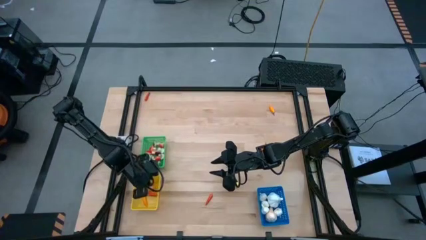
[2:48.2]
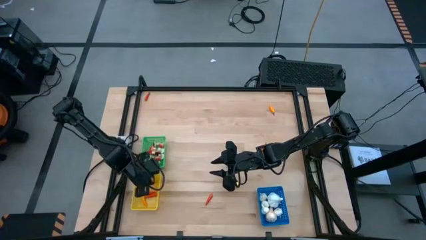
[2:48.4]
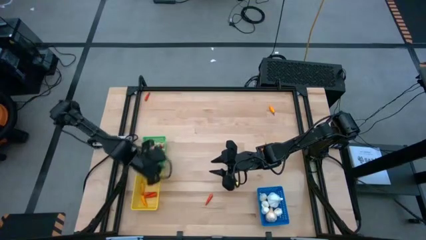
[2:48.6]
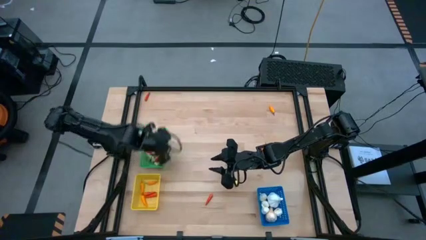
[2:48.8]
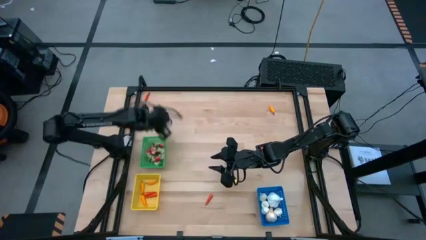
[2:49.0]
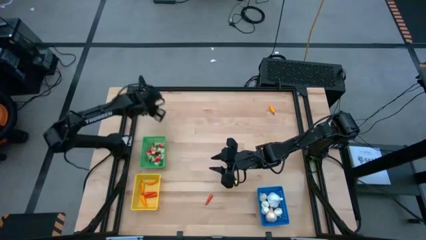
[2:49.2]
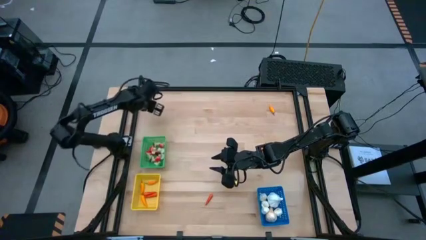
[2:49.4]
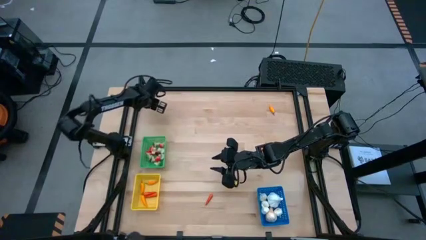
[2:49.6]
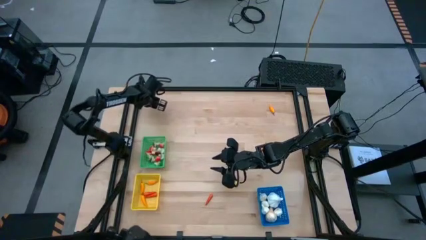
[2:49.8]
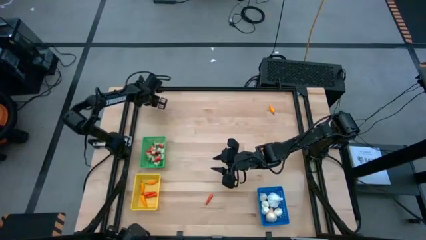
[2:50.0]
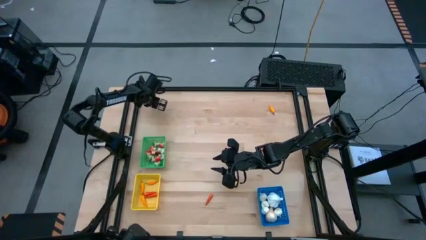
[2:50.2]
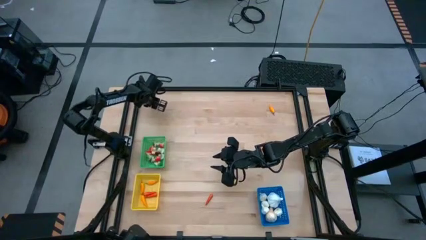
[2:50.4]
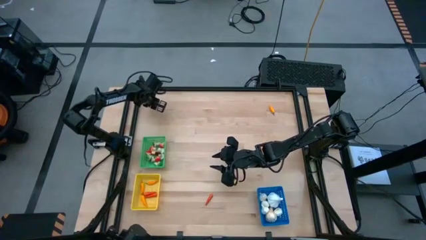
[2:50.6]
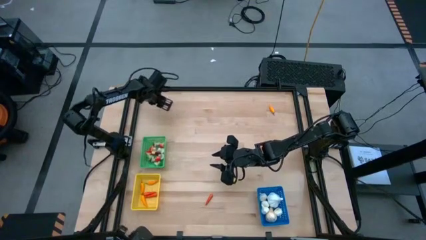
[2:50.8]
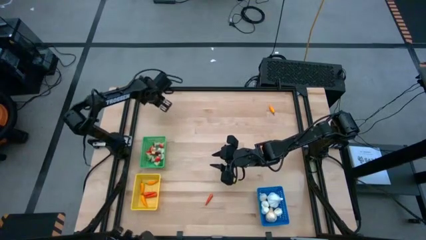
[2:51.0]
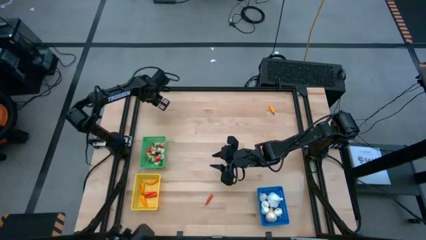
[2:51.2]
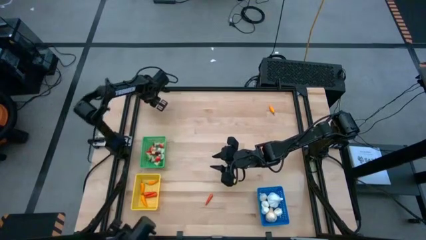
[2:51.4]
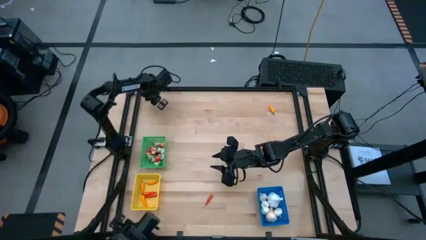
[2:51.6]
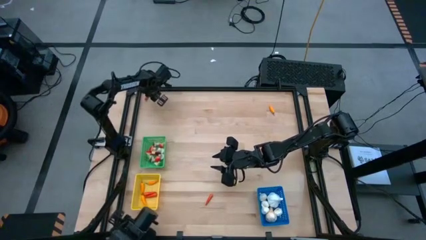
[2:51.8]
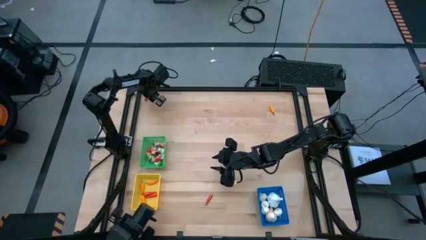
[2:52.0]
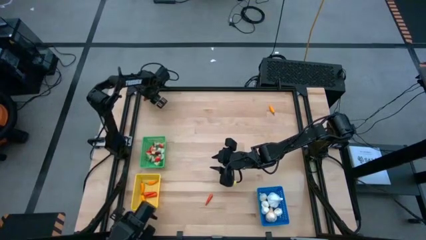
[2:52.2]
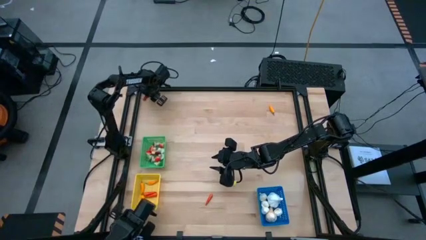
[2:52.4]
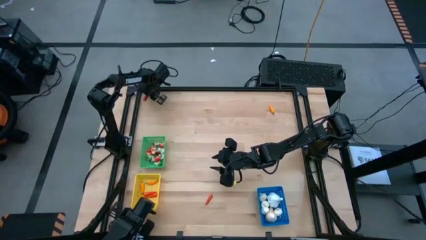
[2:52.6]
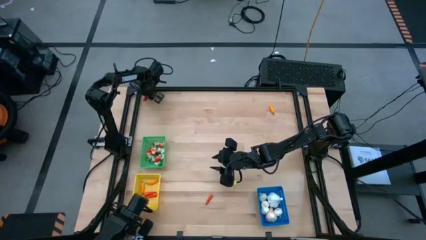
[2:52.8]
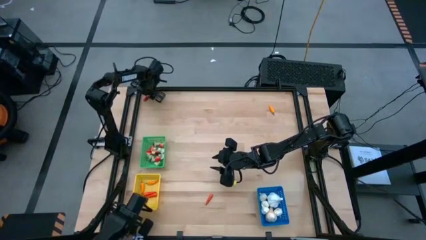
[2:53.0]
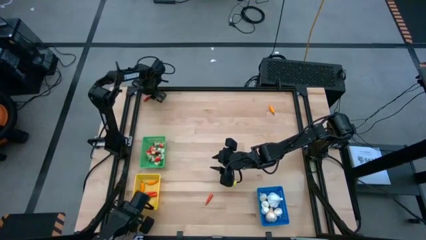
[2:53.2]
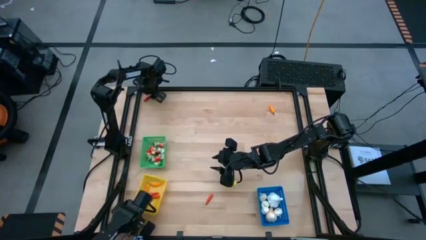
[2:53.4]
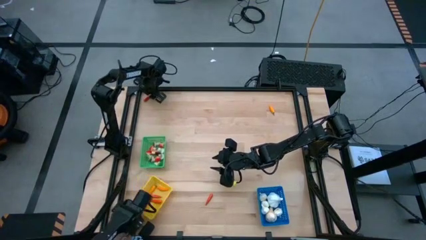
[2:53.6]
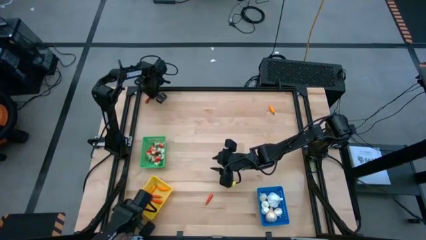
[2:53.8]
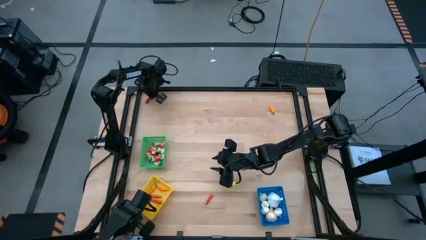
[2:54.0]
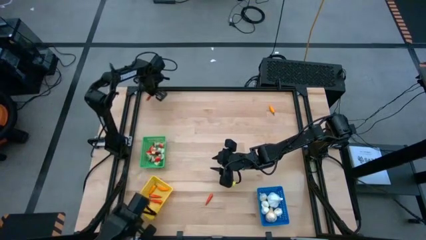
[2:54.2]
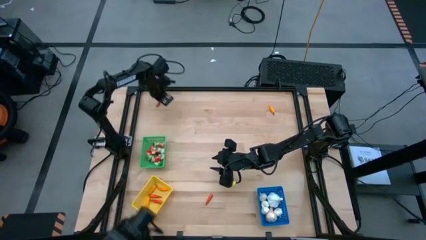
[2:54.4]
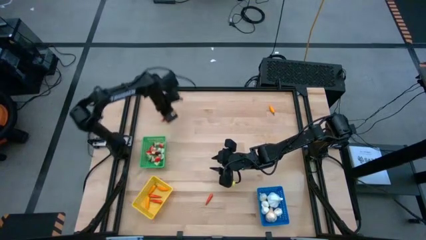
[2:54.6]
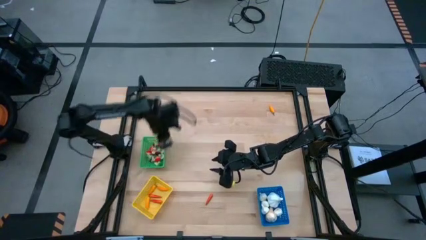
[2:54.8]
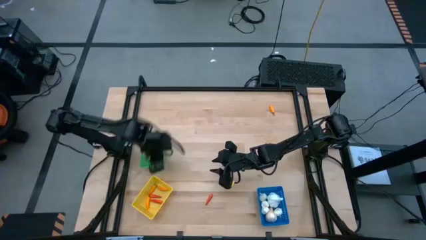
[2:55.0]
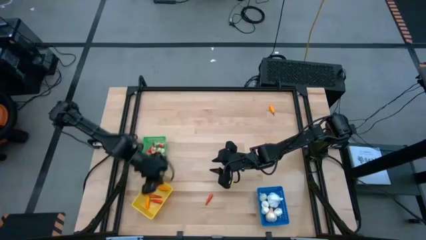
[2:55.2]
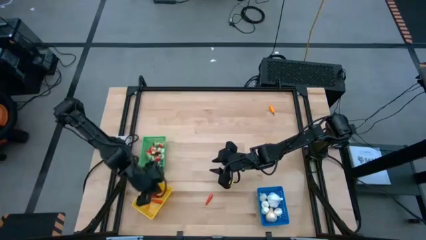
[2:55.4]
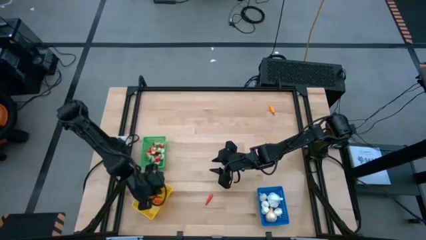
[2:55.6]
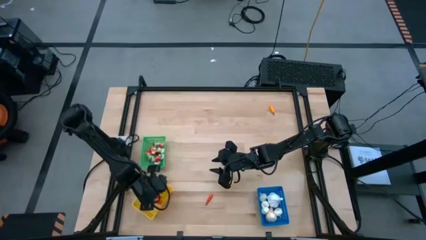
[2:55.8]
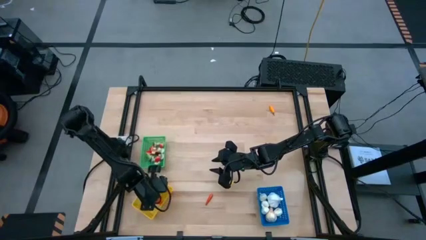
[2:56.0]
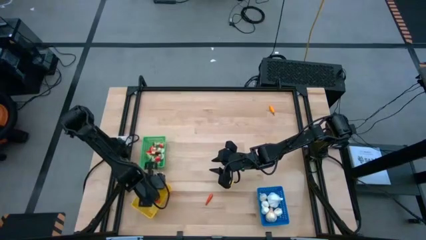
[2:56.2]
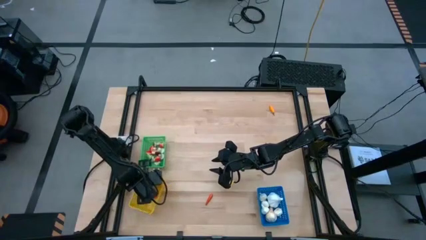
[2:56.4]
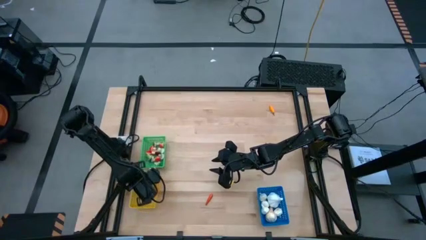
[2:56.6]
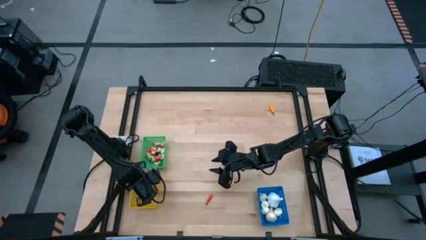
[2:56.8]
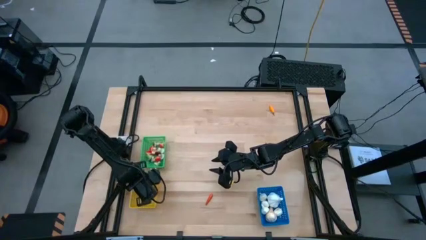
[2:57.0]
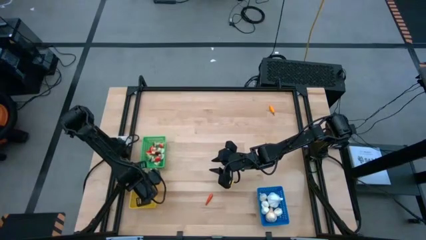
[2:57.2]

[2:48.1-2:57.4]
Task: Sort produce into baskets
Put the red chili pepper into the yellow bin

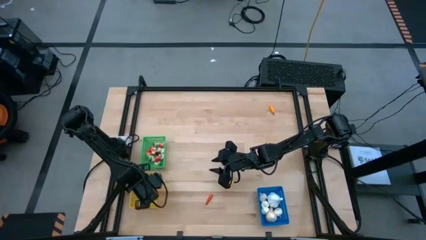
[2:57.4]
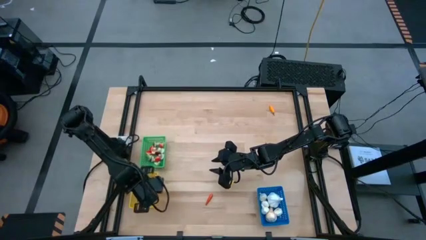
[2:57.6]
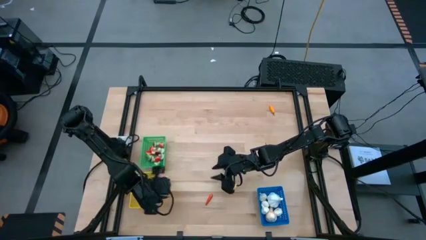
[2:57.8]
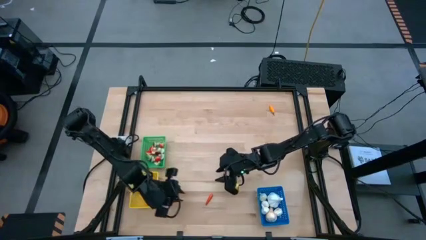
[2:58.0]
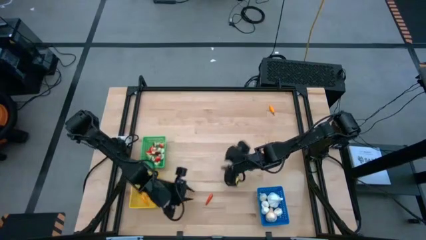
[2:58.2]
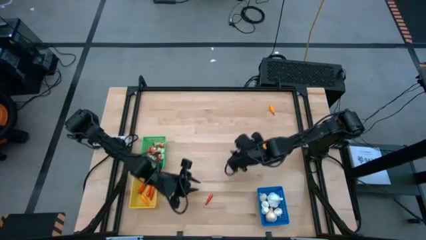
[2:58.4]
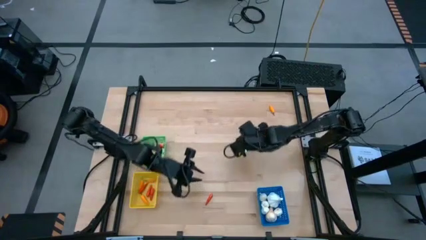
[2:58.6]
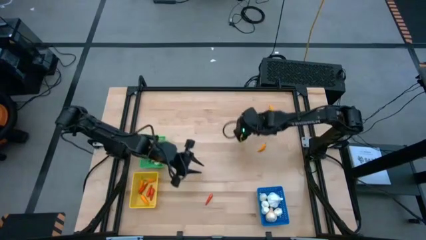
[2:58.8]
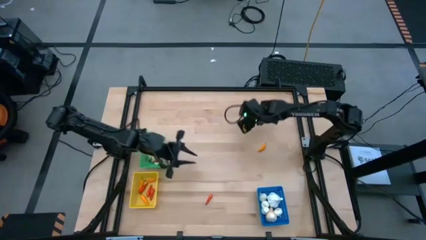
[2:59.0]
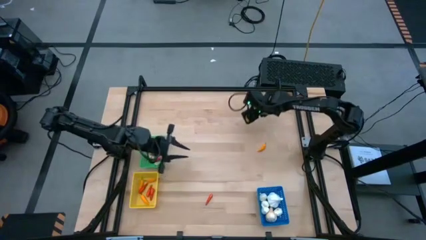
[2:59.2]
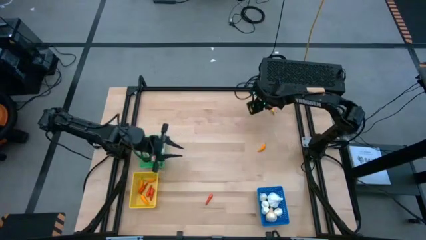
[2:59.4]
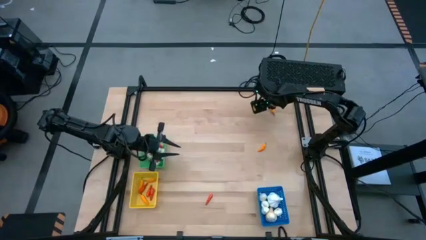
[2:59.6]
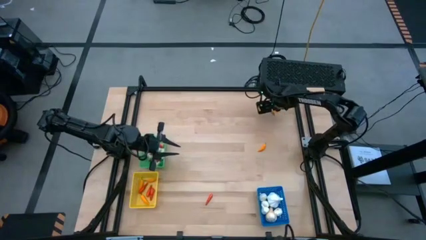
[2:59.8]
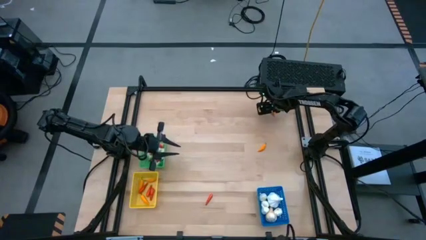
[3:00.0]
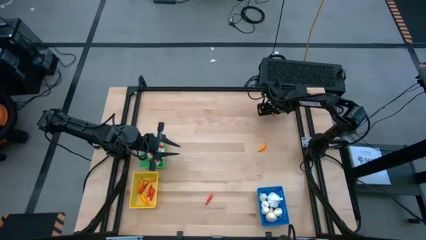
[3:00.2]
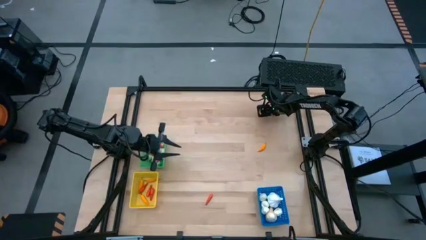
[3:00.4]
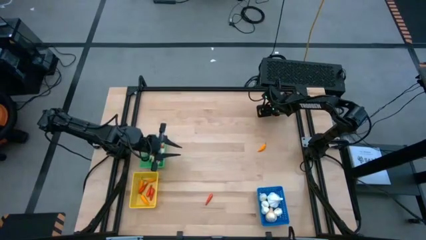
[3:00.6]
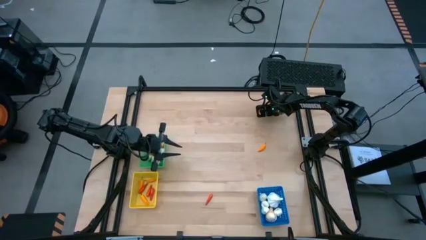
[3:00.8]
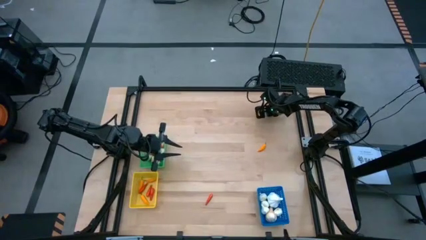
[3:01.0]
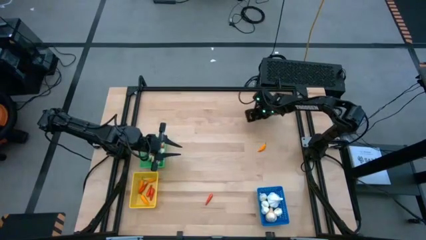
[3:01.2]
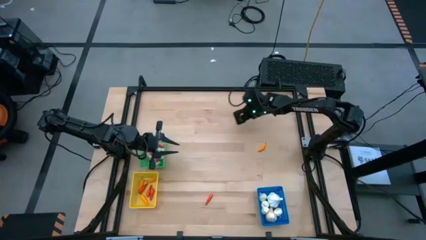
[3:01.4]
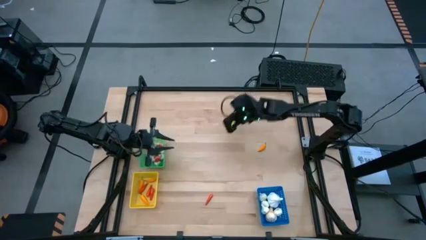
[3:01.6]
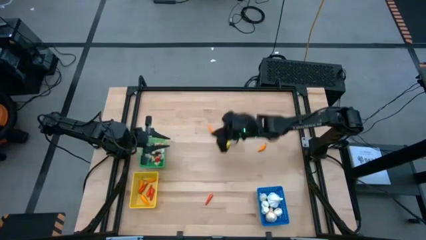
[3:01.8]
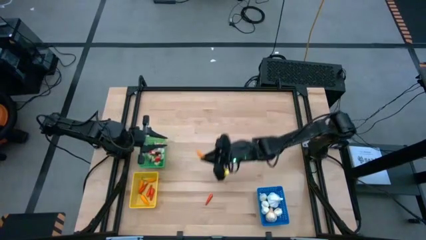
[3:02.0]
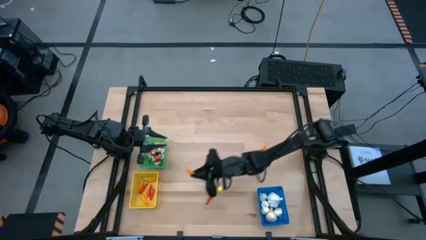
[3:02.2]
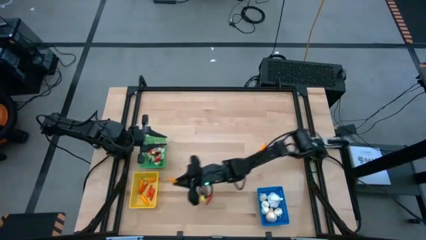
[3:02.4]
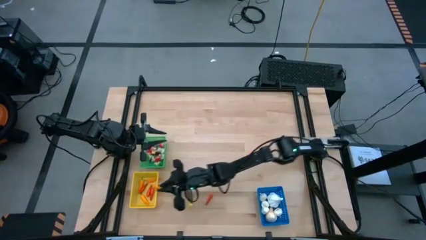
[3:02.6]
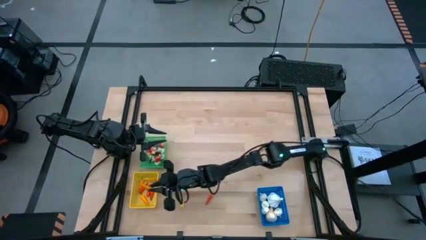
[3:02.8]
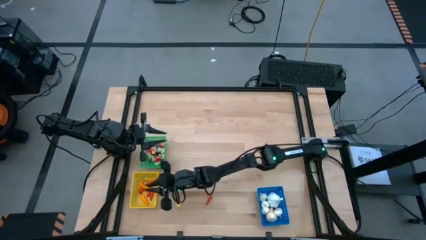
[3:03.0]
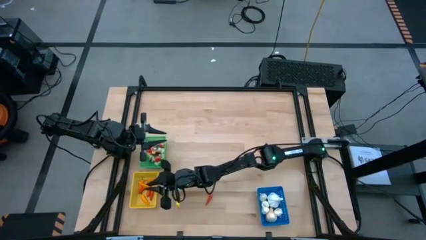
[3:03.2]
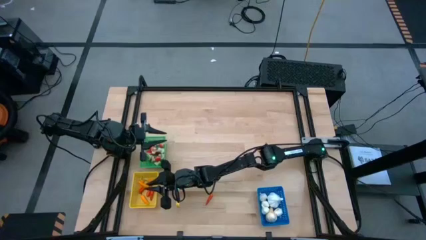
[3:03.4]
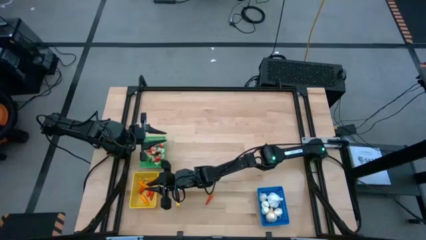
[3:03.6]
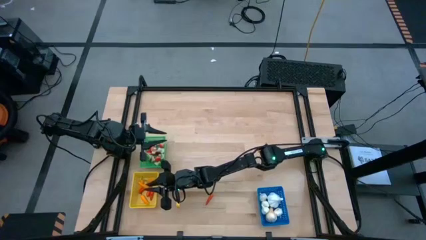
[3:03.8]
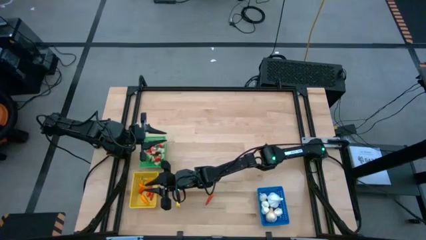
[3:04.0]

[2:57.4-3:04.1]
Put the yellow chili pepper into the yellow bin

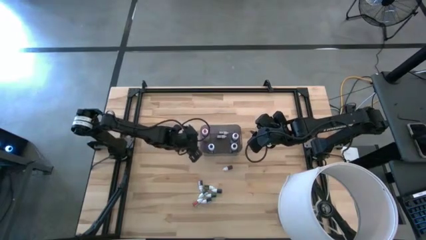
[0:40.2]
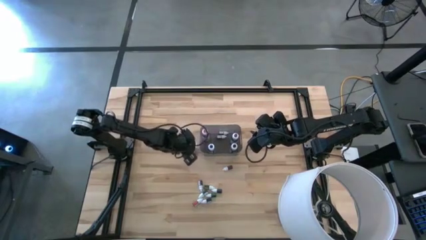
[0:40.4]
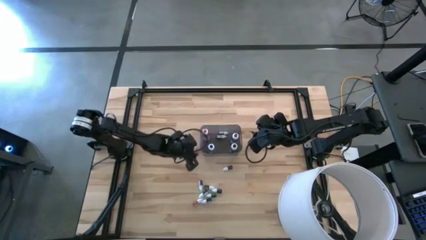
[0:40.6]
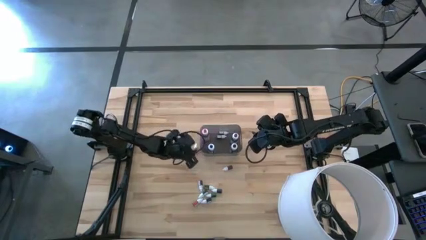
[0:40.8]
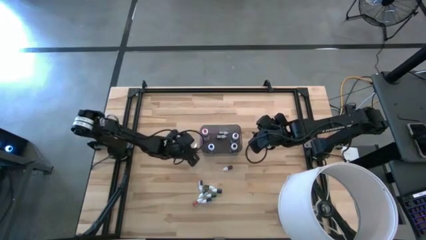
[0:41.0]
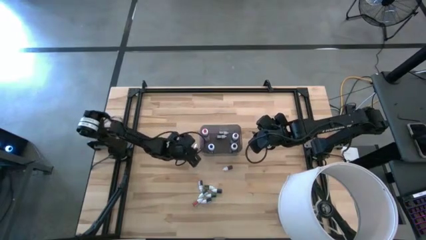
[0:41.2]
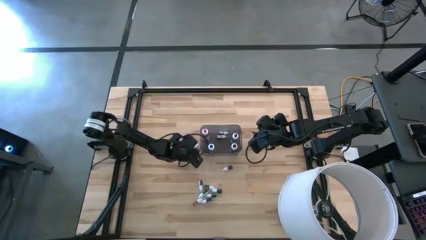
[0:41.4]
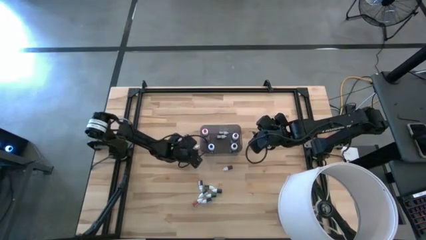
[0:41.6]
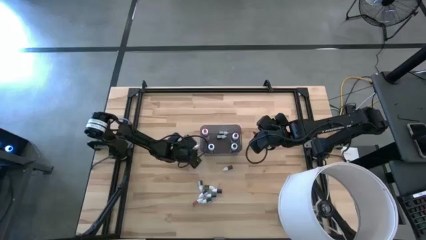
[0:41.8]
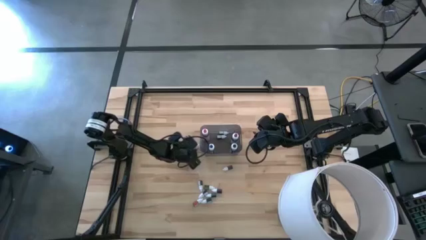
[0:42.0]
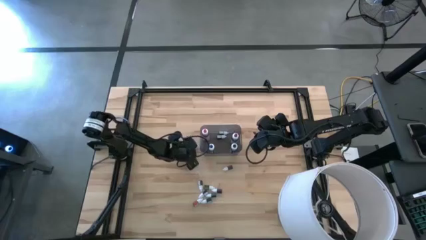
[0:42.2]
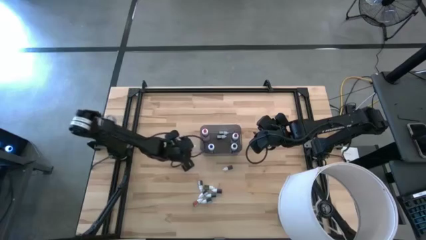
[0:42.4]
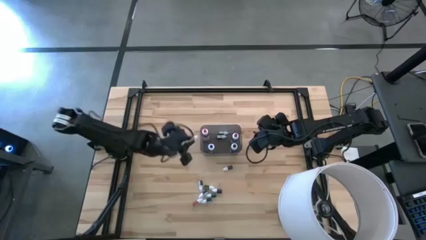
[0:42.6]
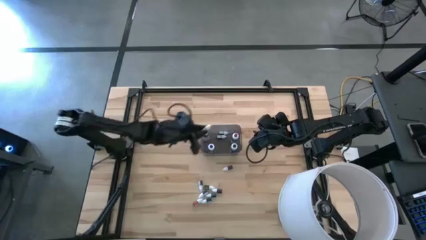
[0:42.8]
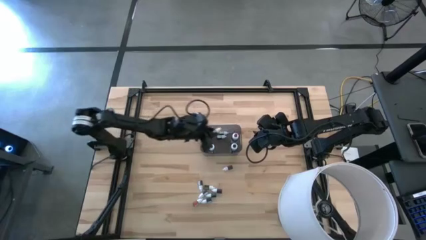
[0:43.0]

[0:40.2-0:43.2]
Task: Pick & Place food coloring
Put the small orange food coloring bottle in the black bin
